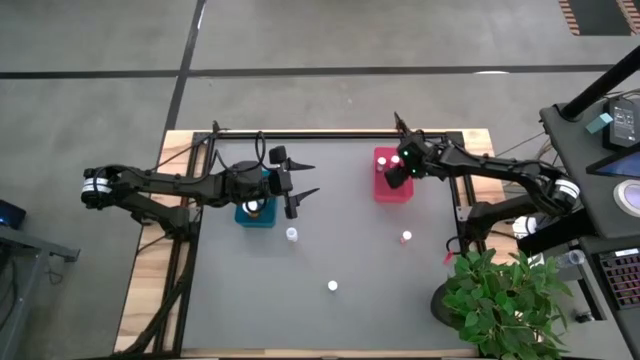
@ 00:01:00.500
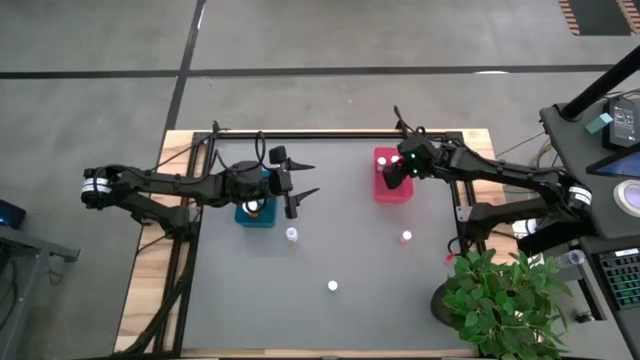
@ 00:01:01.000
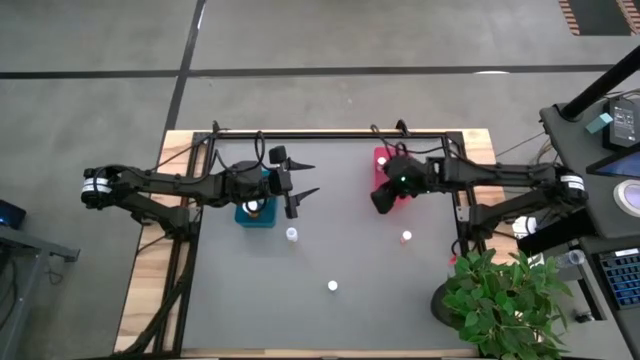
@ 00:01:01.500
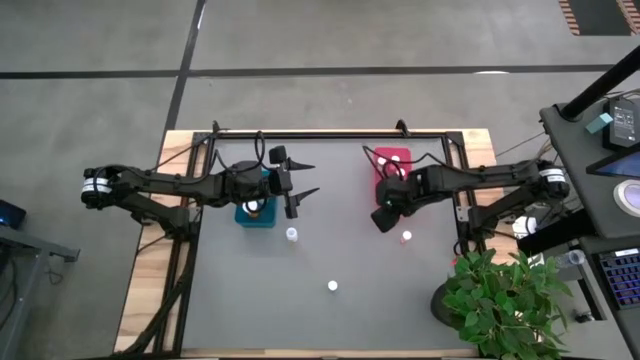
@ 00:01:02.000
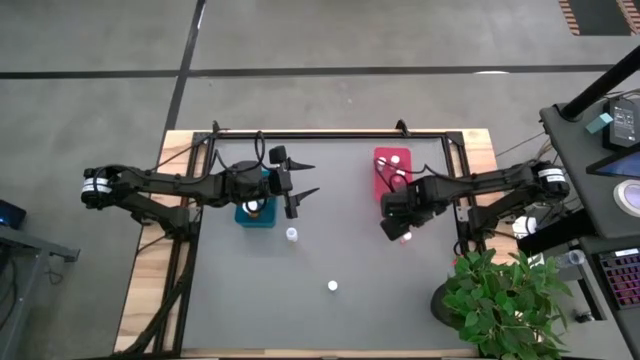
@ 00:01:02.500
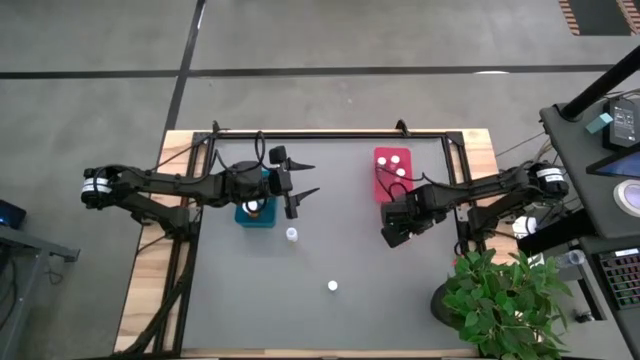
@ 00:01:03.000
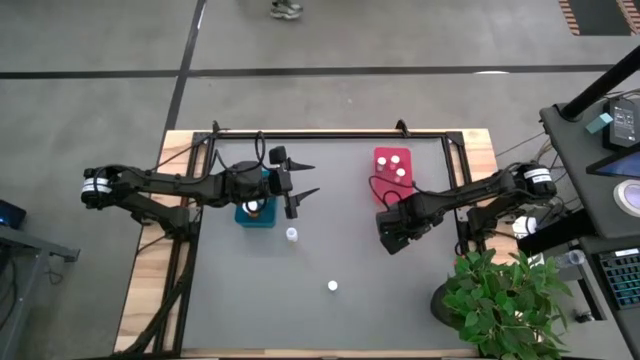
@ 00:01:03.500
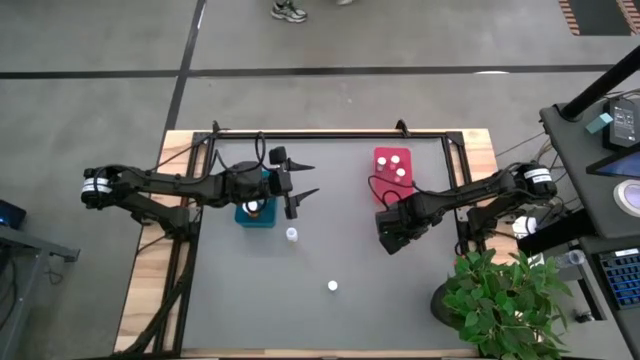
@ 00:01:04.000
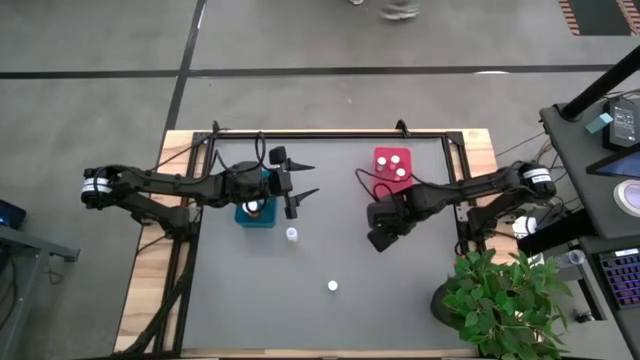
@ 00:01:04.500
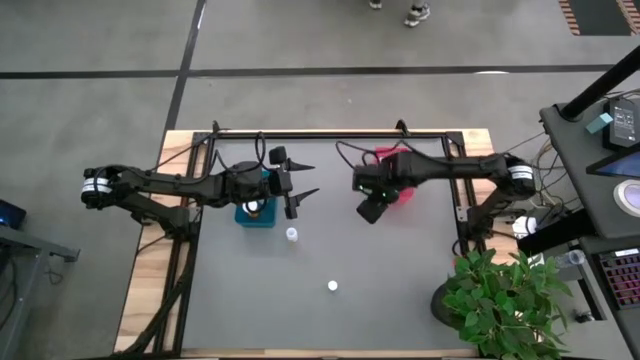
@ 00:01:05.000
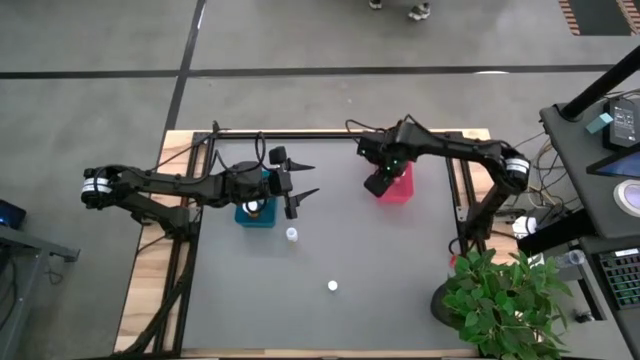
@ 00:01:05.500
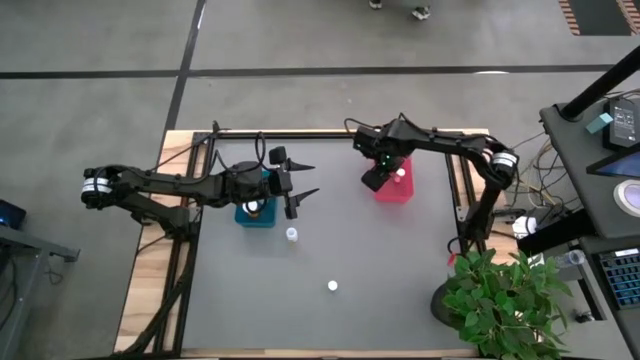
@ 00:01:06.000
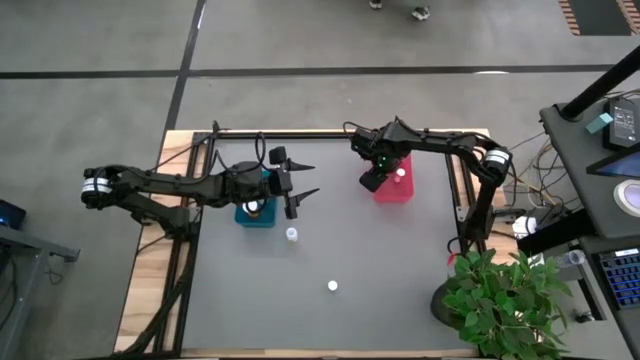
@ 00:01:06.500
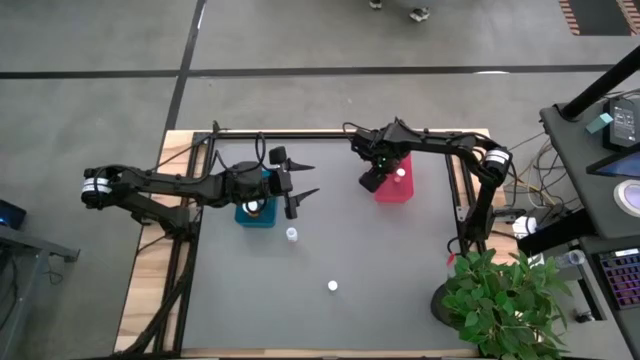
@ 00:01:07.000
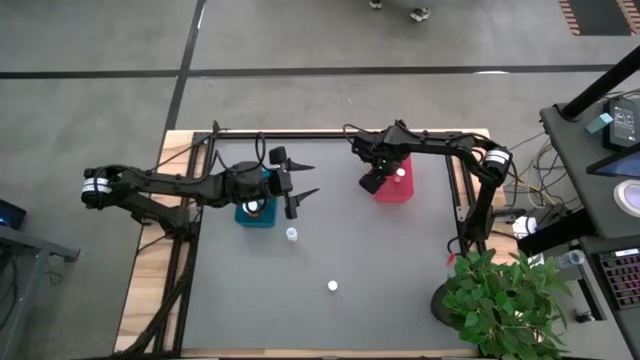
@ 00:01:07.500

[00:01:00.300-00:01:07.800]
Task: Pick and place medicine bottles into bin by pill shape (circle, oval)
Put the orange tablet bottle into the red bin

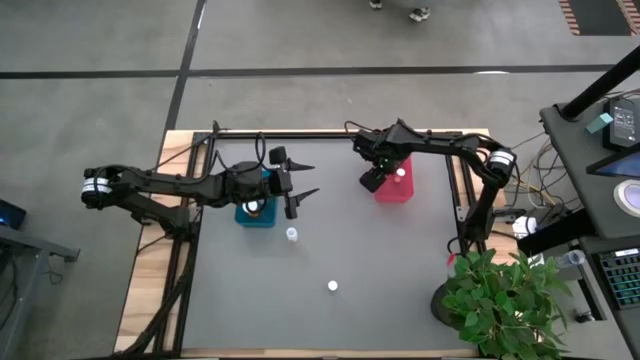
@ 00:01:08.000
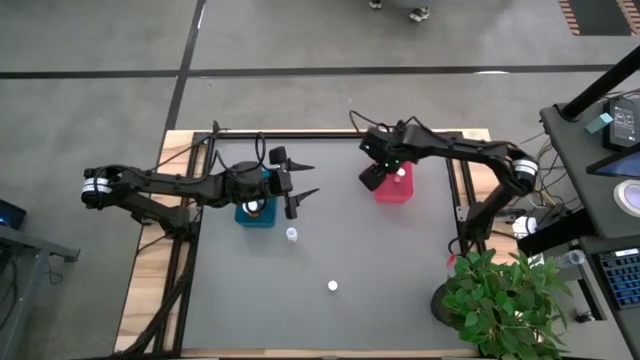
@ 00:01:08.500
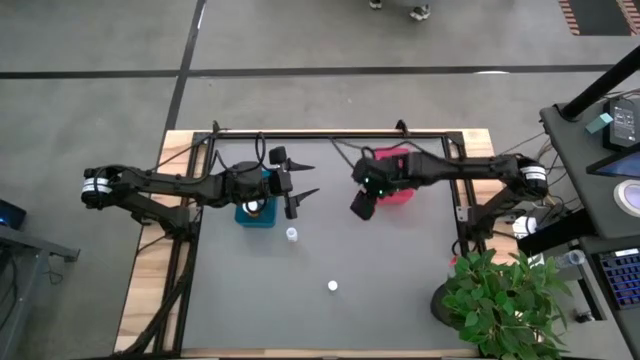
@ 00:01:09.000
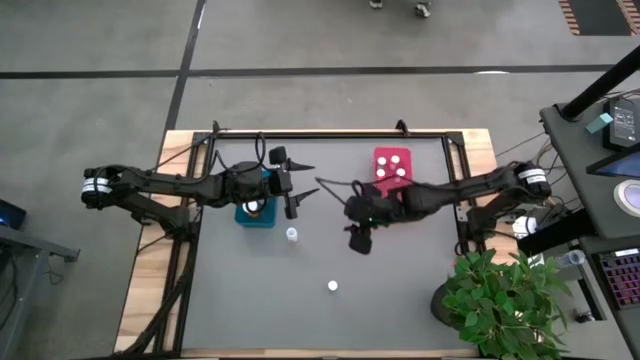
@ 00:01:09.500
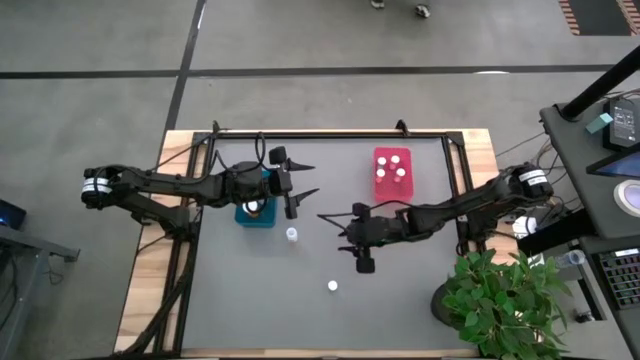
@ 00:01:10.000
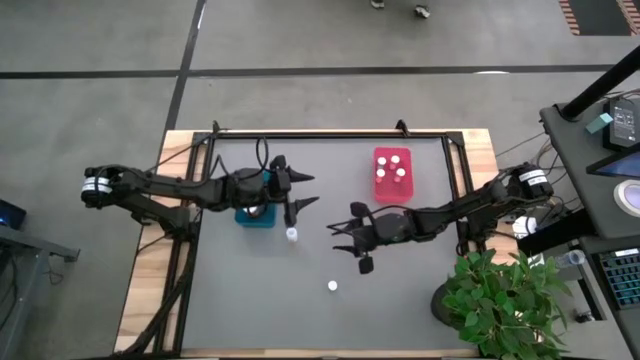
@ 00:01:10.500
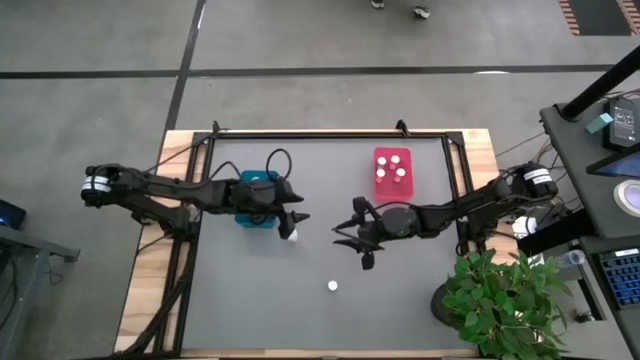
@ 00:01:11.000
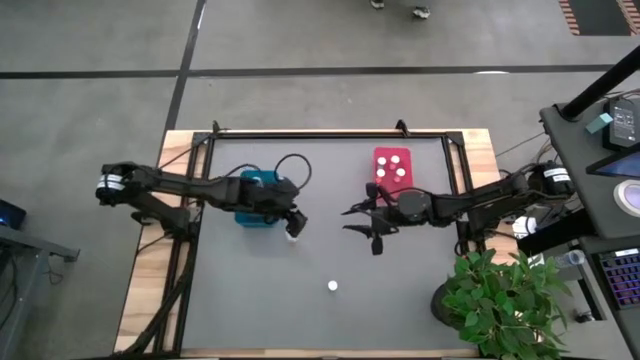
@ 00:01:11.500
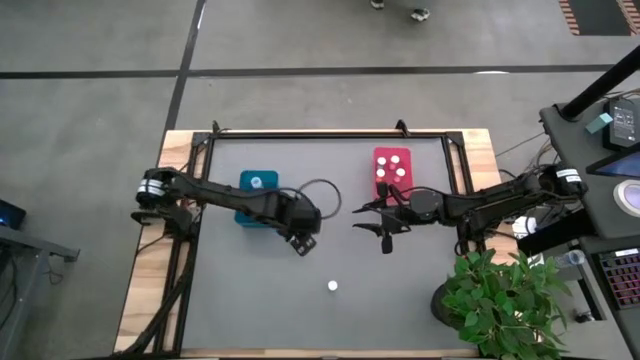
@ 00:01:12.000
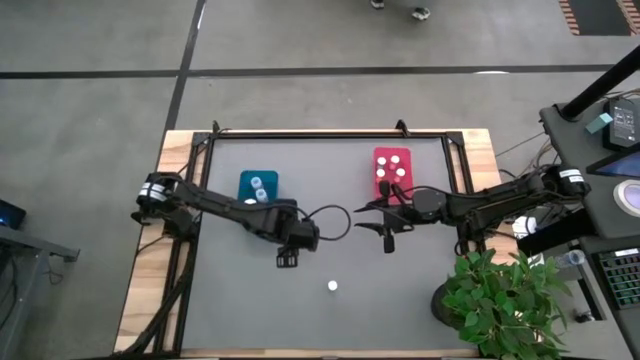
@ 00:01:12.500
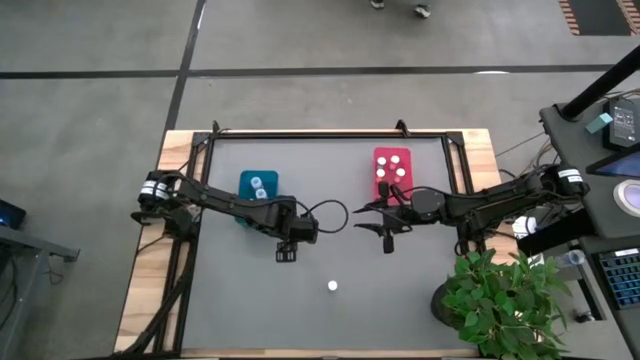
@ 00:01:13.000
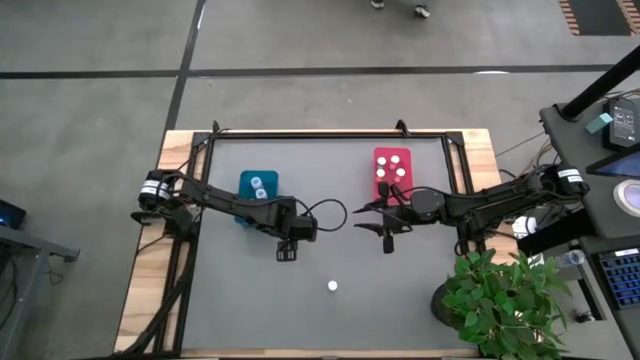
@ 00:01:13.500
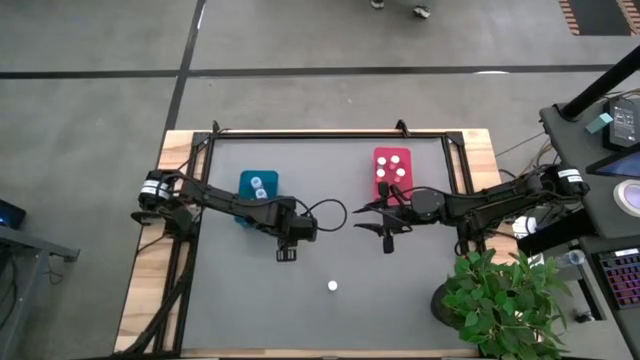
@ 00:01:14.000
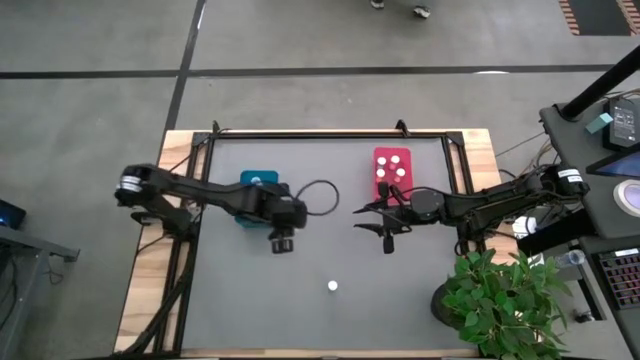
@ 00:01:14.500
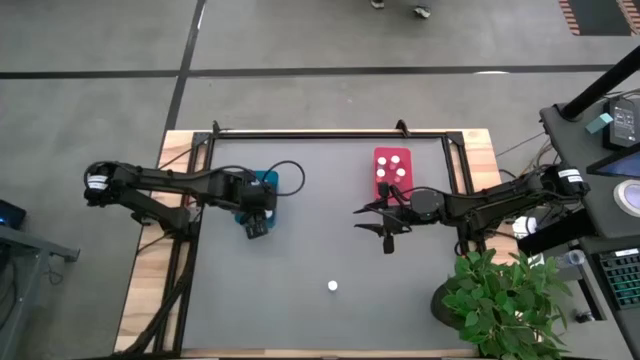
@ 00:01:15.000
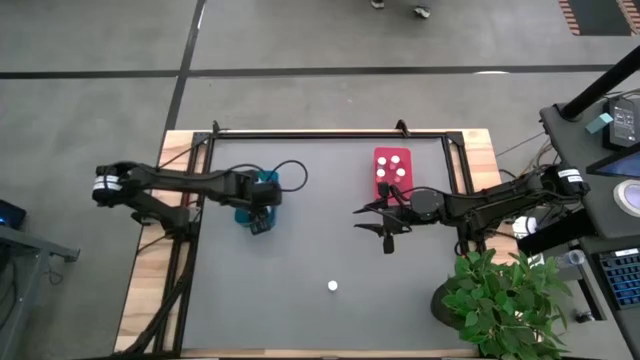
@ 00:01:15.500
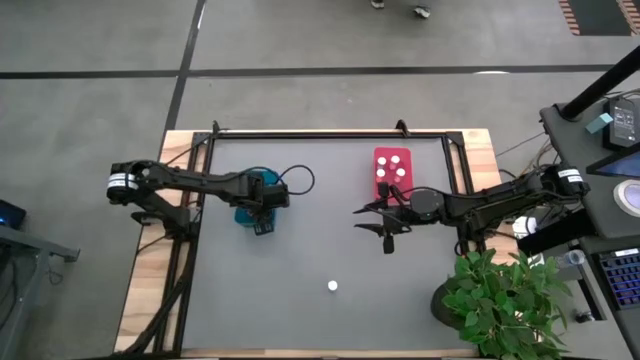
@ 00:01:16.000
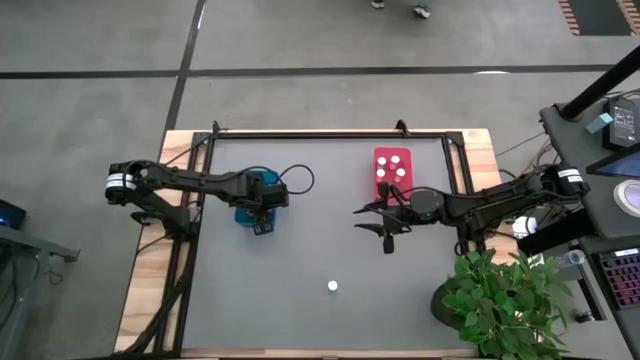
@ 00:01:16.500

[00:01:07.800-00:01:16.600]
Put the transparent capsule bottle into the blue bin

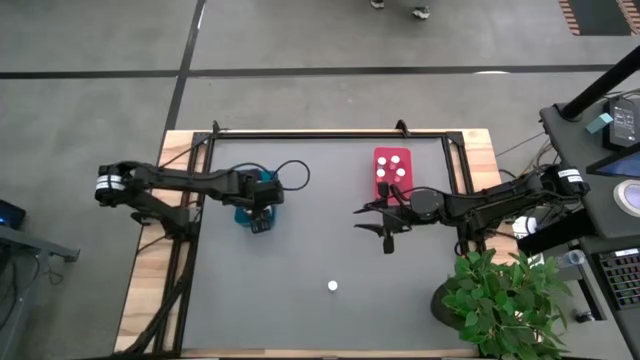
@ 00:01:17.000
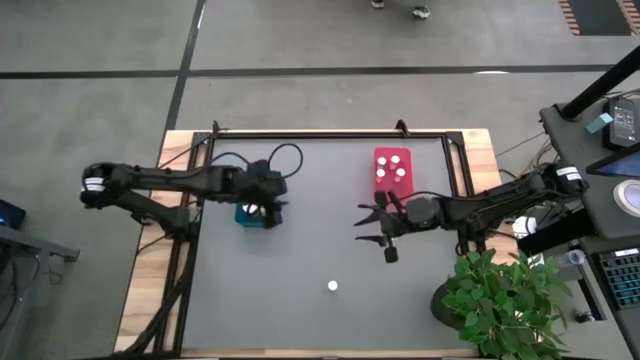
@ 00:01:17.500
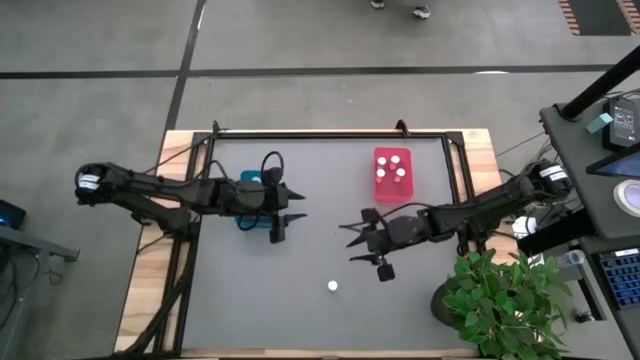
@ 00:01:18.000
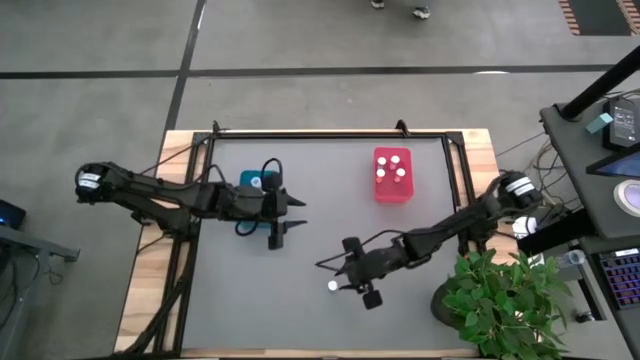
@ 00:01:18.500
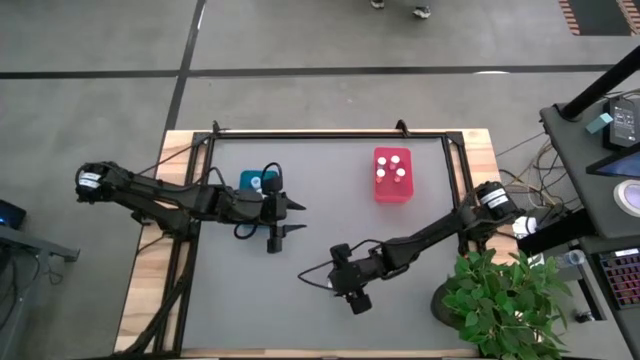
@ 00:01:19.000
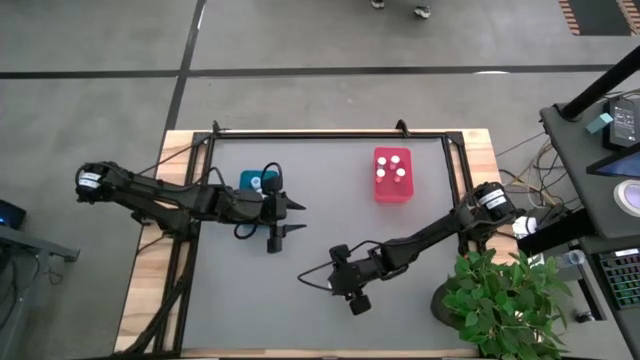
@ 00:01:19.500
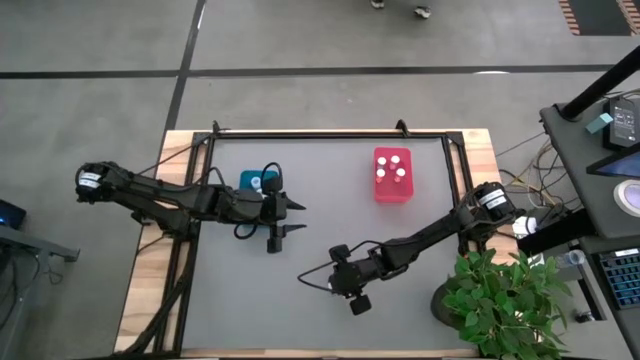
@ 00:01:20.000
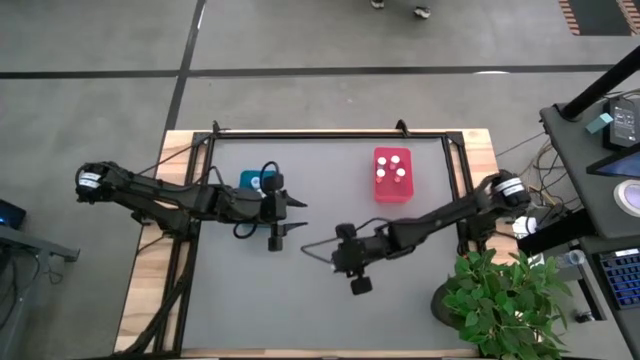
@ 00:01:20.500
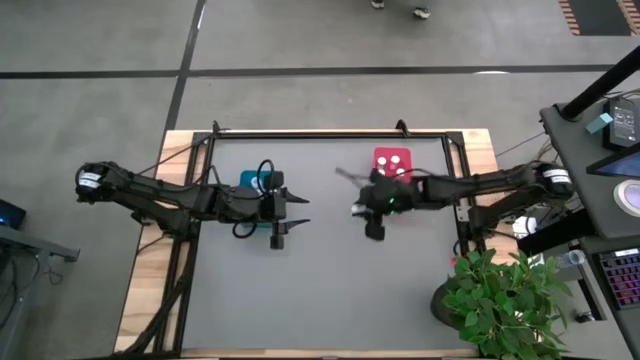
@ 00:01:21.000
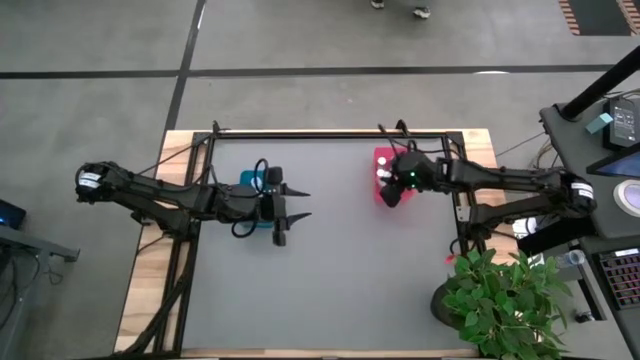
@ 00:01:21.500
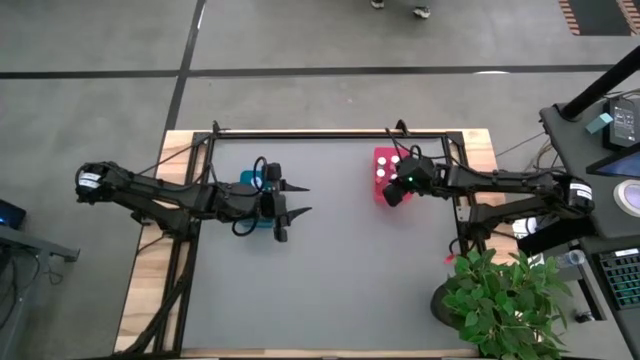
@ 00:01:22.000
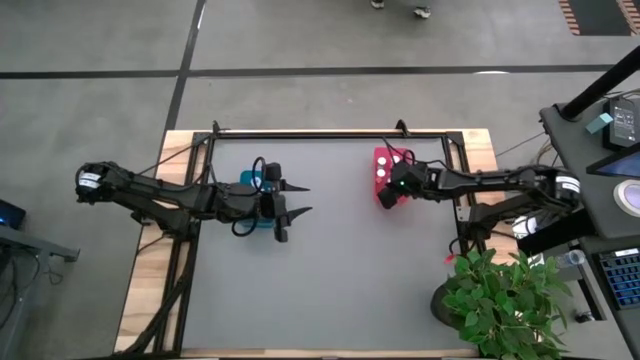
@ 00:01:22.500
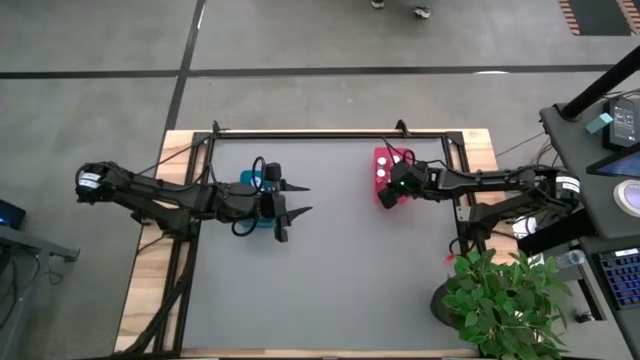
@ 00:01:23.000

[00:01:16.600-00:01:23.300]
Put the blue tablet bottle into the red bin
